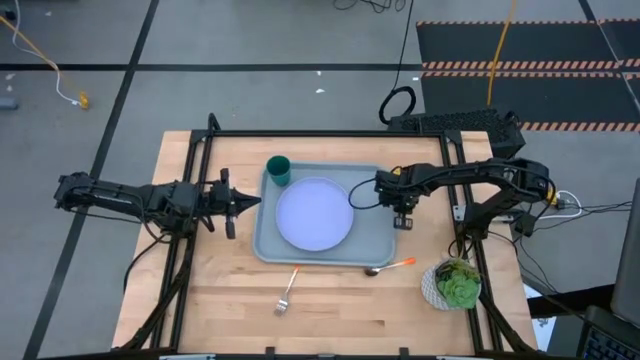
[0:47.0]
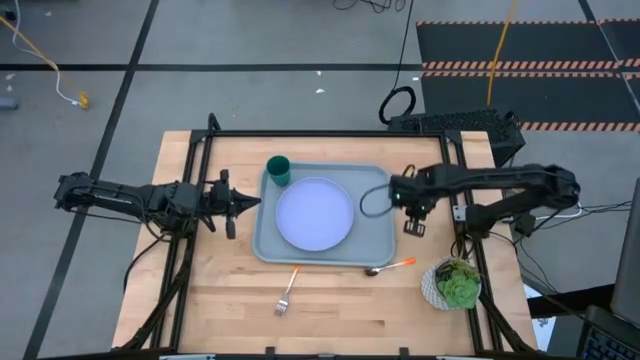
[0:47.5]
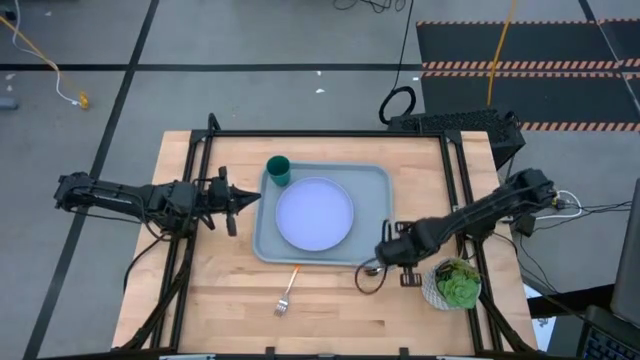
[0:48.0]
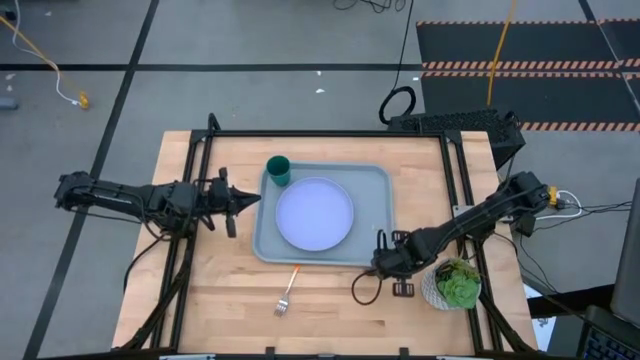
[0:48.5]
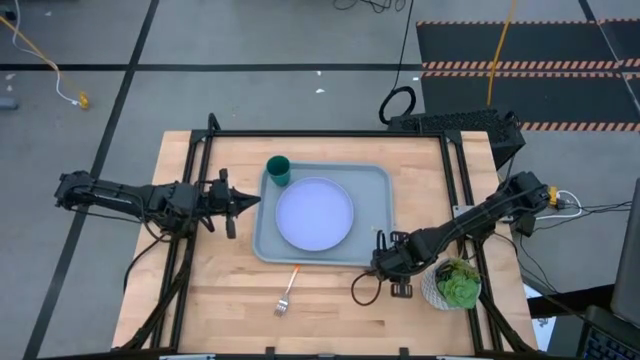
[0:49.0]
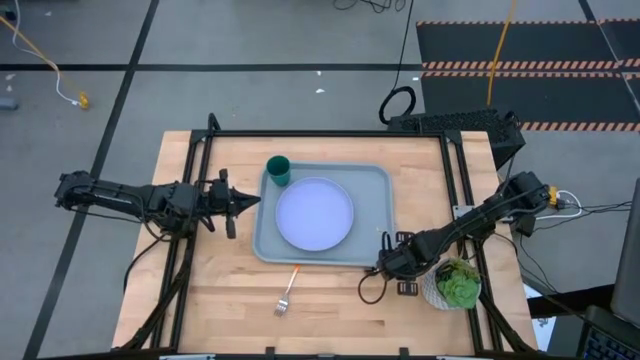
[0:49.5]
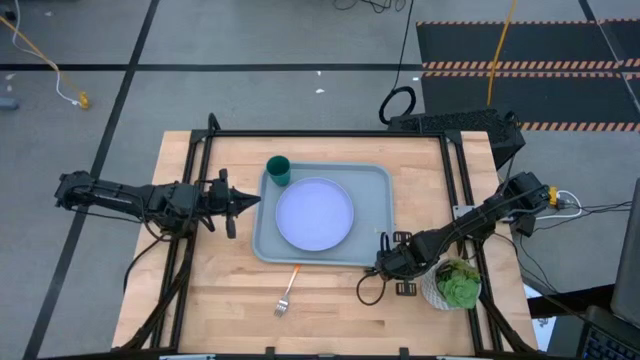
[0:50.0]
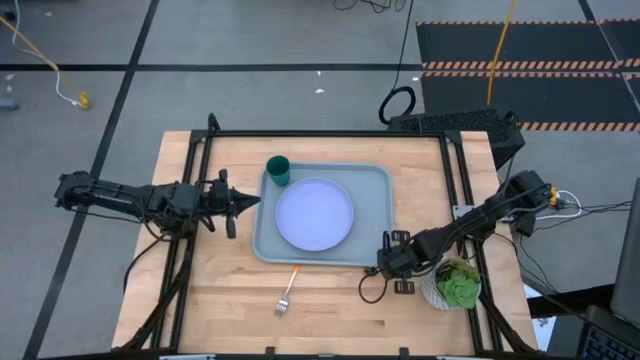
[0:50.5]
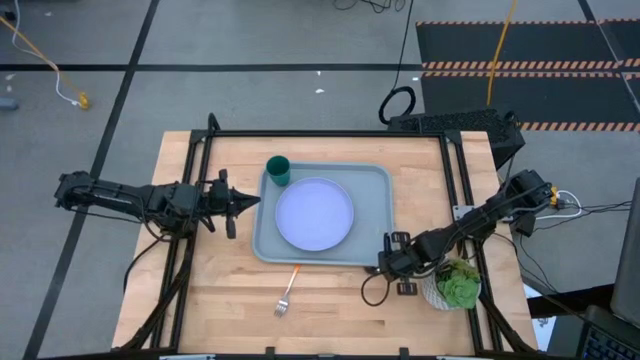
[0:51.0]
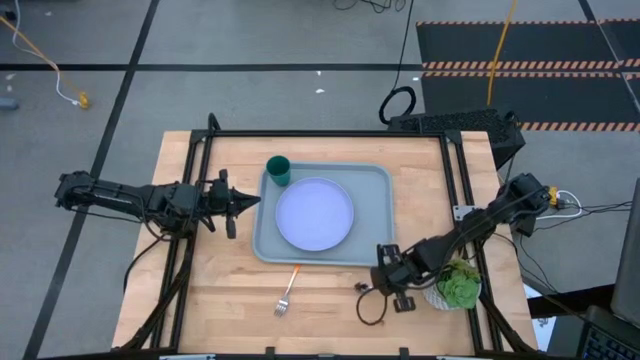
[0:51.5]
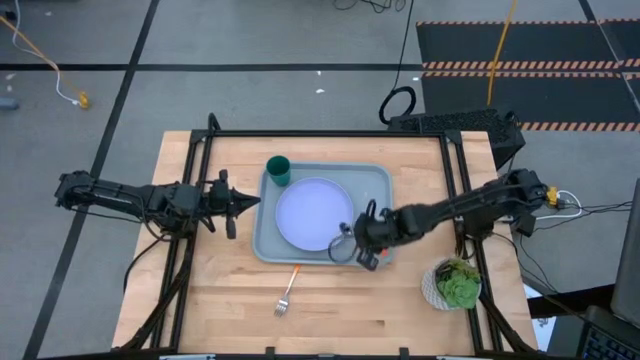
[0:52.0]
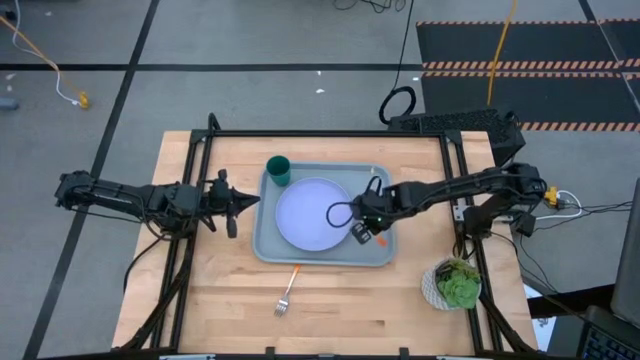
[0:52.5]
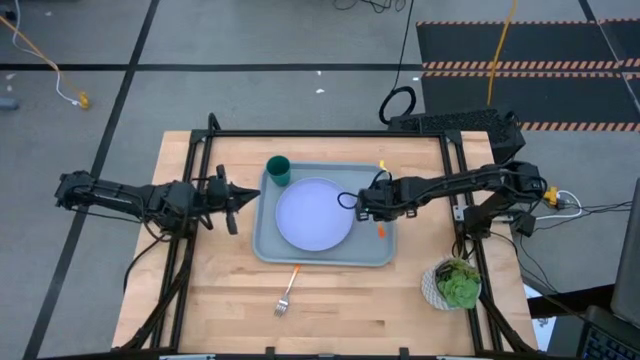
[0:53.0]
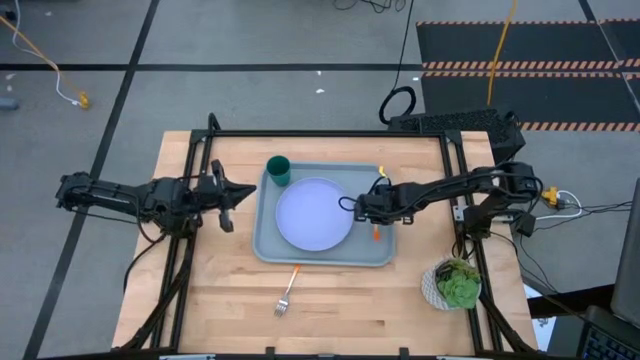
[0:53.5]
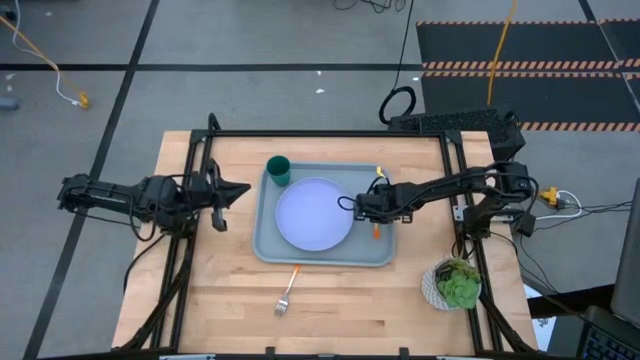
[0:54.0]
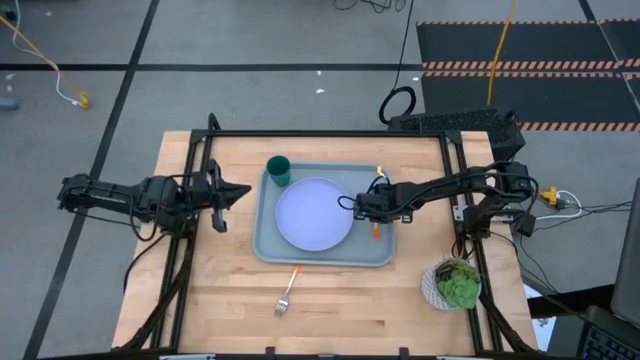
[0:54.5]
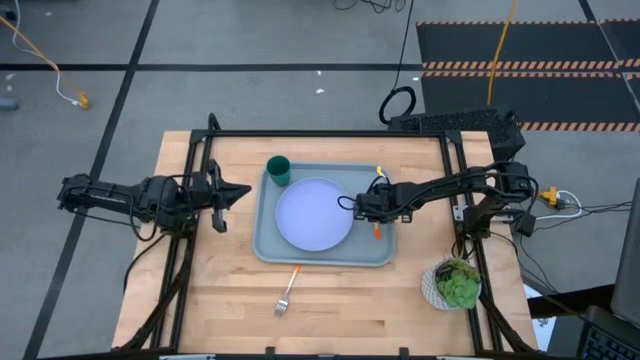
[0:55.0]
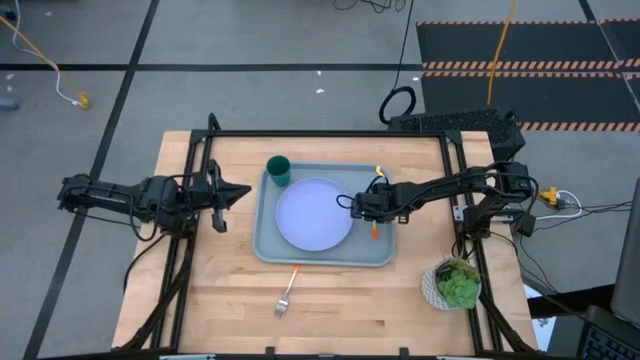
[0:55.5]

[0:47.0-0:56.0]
Task: Pick and place plate/cup/fork/spoon on tray
Put the orange spoon on the gray serving tray to the right of the violet plate

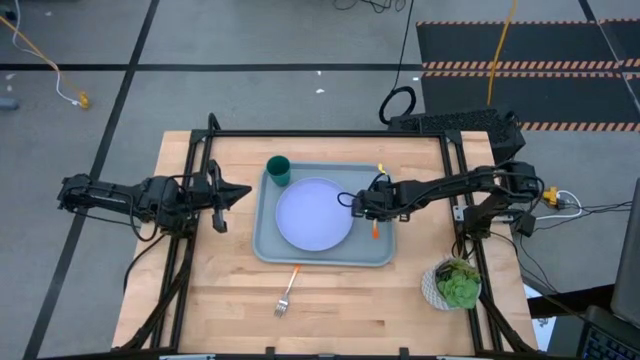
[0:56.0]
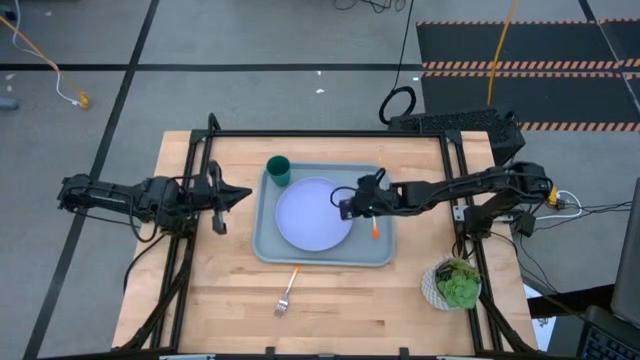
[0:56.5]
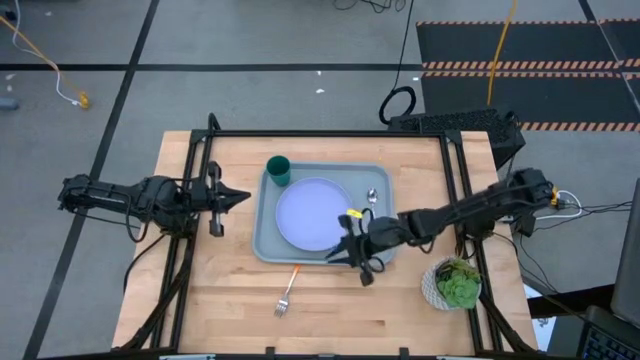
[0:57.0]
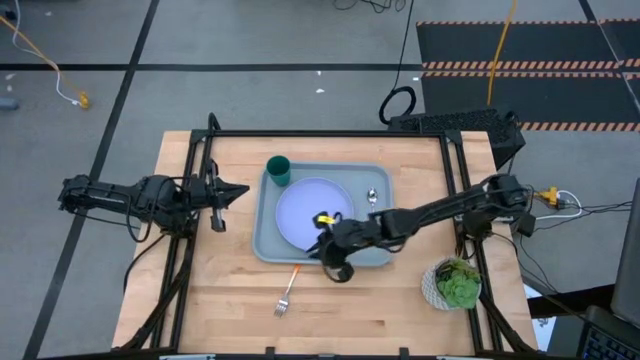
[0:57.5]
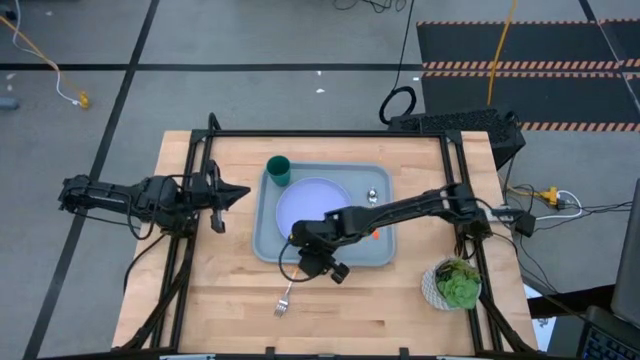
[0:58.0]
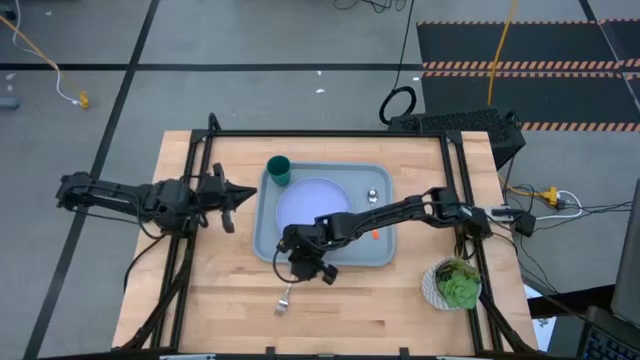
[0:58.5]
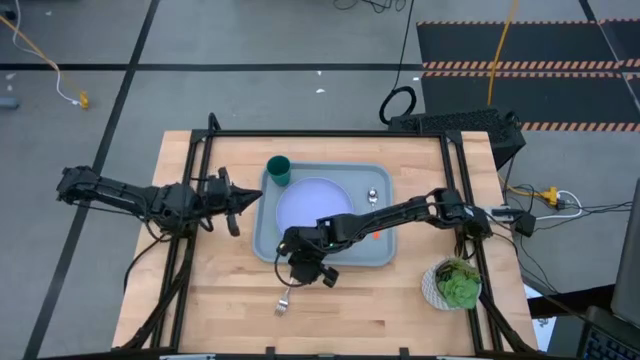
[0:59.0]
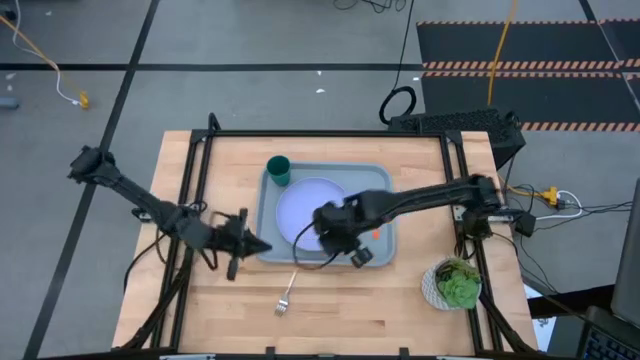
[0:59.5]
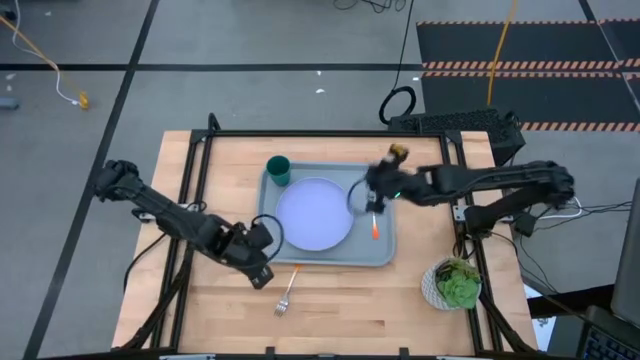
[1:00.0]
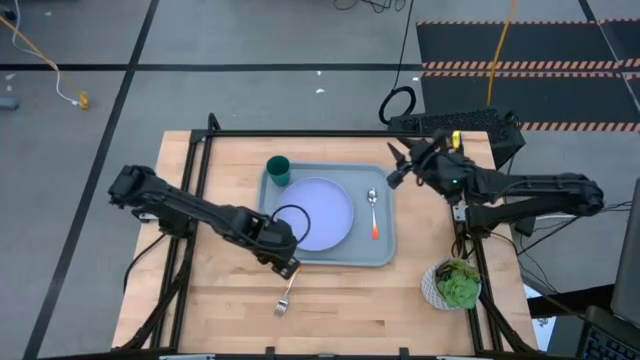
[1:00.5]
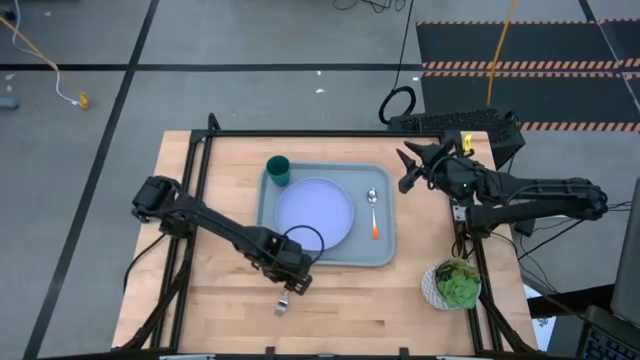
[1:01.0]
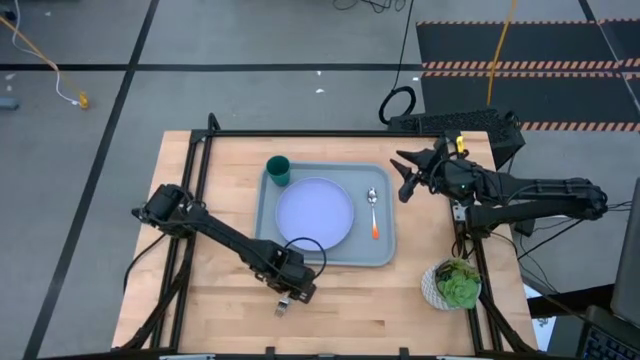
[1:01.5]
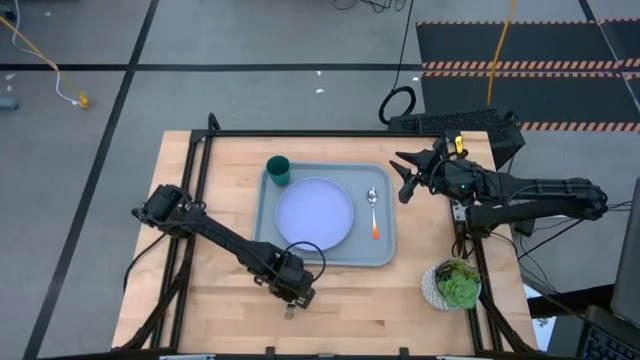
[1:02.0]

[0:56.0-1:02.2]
Put the orange fork on the gray serving tray in between the violet plate and orange spoon

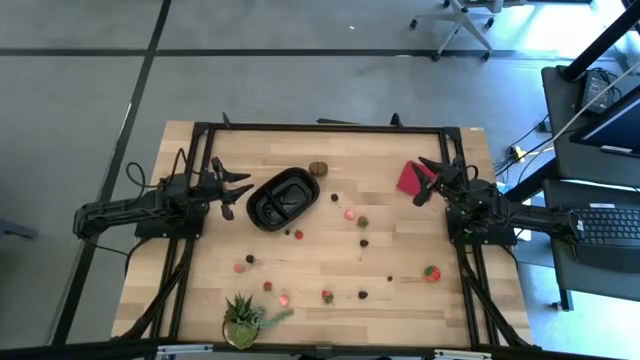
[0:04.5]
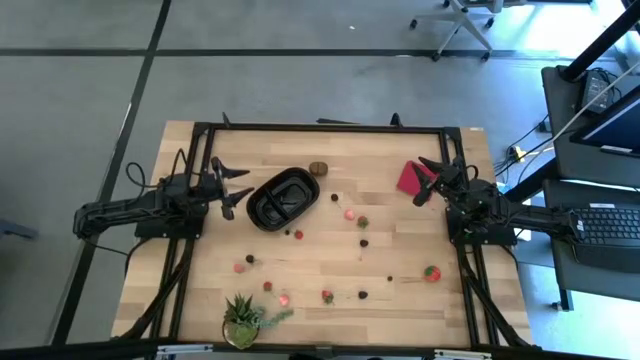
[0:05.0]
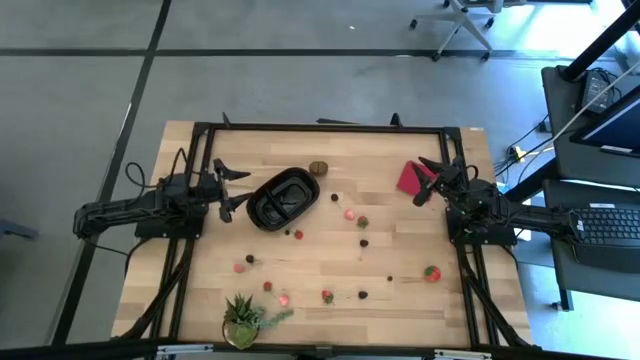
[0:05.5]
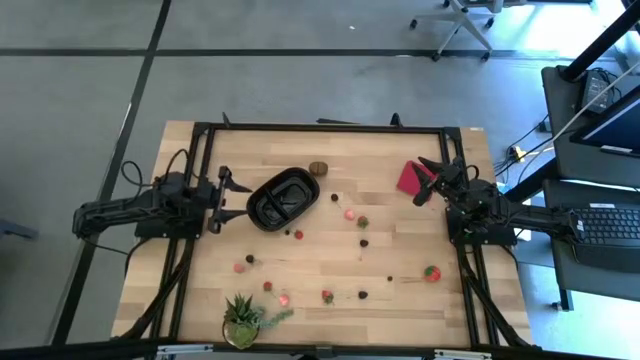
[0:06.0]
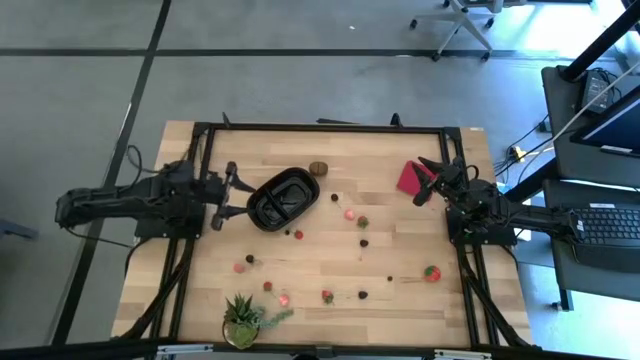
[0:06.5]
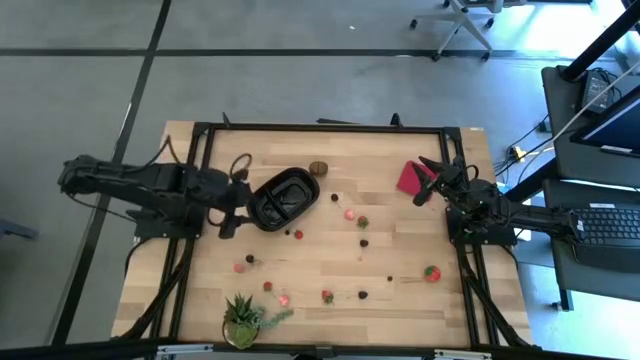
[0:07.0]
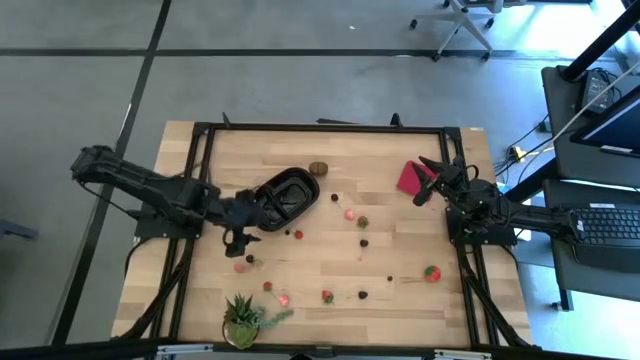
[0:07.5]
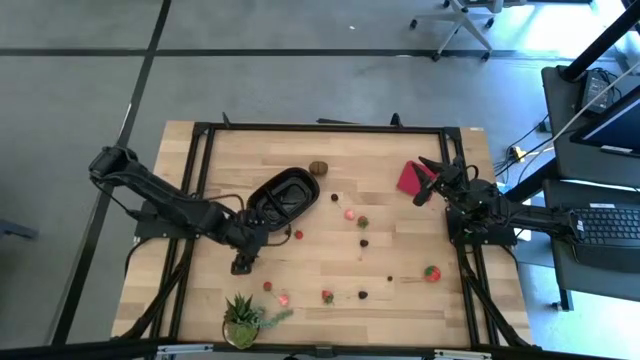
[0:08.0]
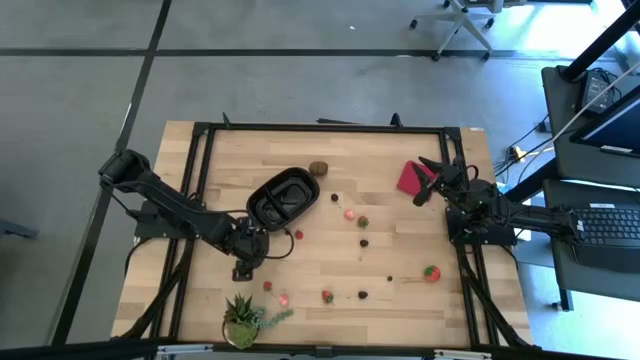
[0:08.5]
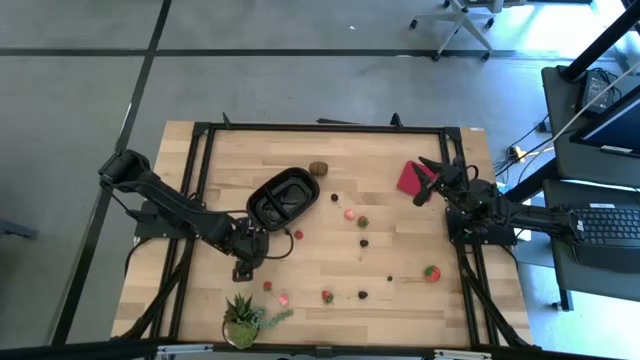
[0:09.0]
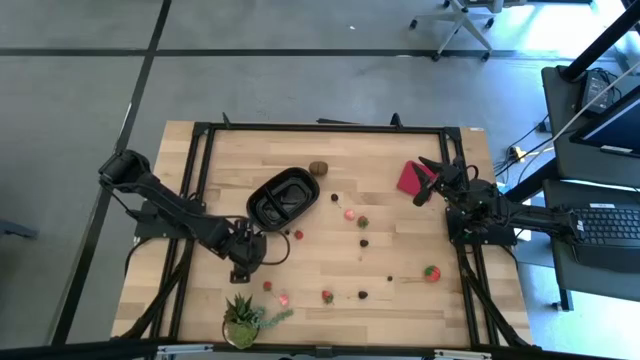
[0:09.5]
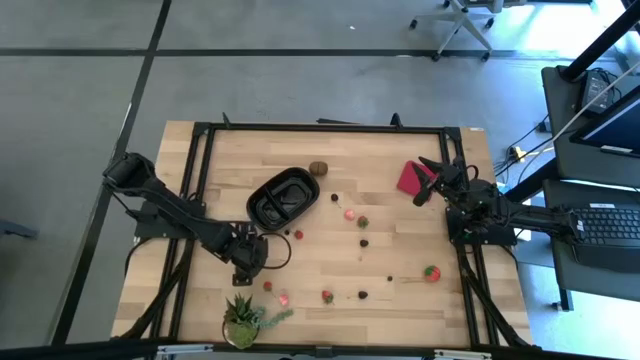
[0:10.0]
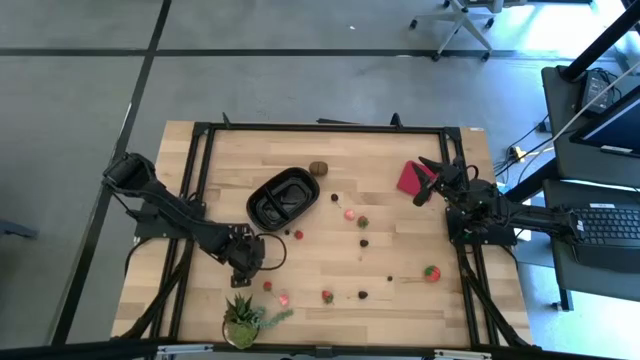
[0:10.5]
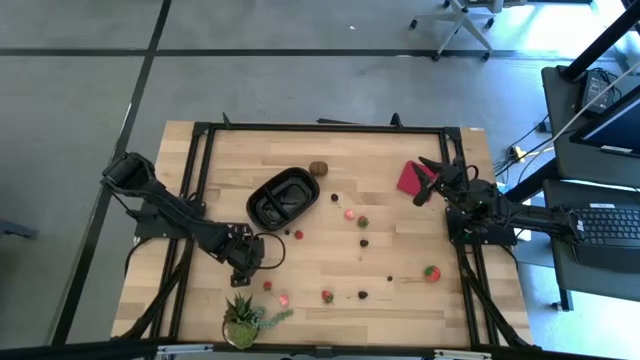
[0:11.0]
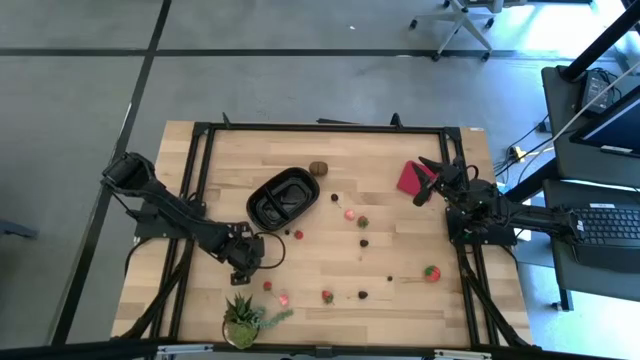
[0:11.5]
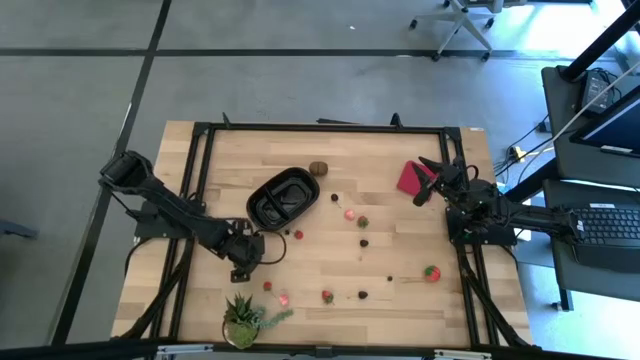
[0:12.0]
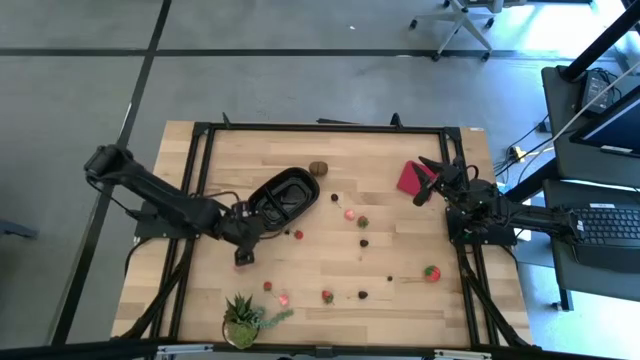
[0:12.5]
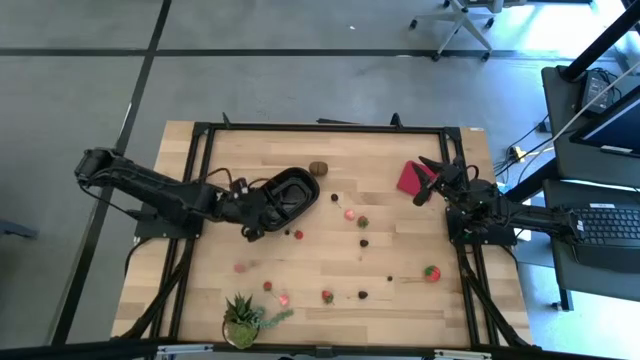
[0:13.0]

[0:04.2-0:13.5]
Task: Pick and placing Produce into tupperware
Put the black cherry into the black bin
